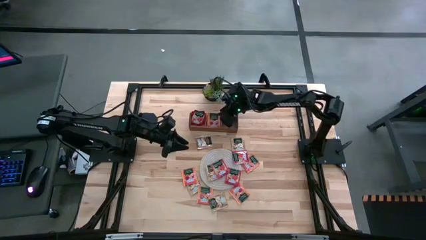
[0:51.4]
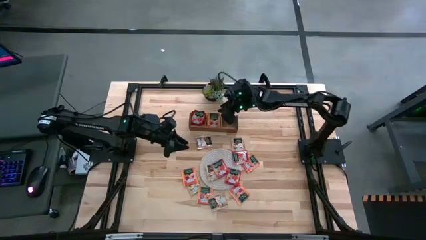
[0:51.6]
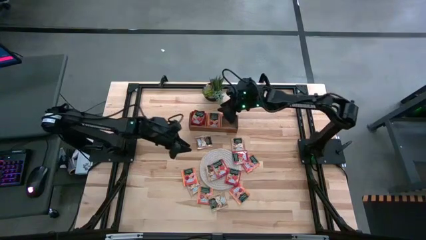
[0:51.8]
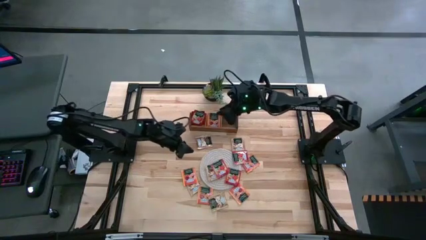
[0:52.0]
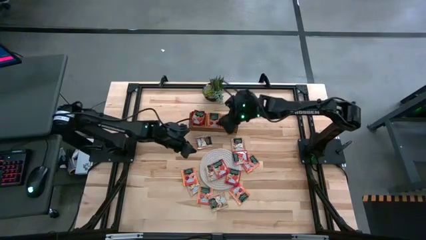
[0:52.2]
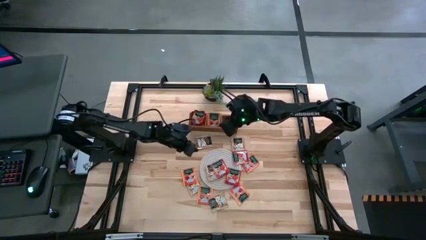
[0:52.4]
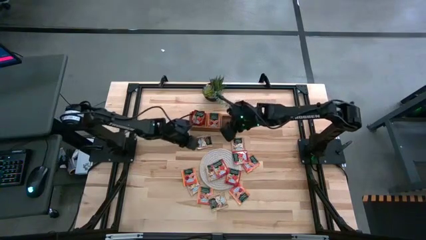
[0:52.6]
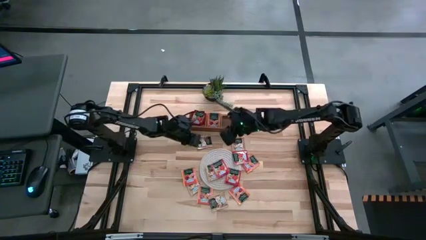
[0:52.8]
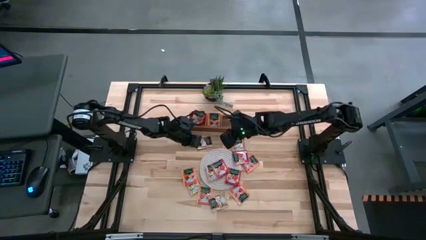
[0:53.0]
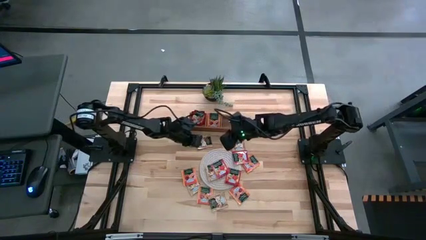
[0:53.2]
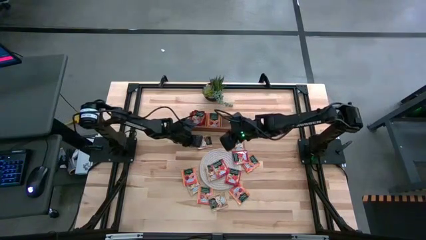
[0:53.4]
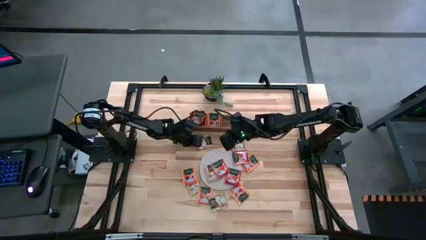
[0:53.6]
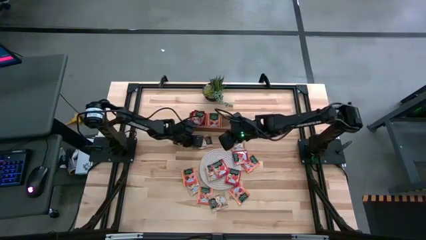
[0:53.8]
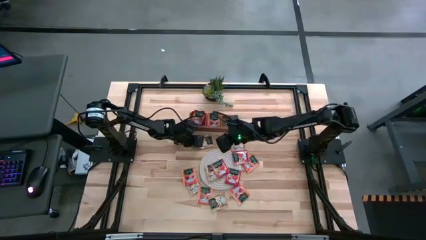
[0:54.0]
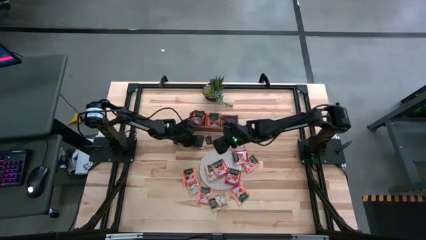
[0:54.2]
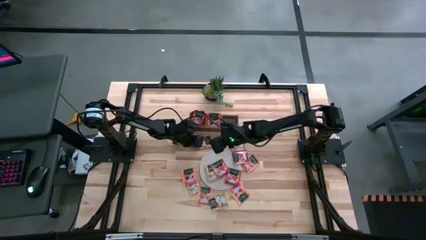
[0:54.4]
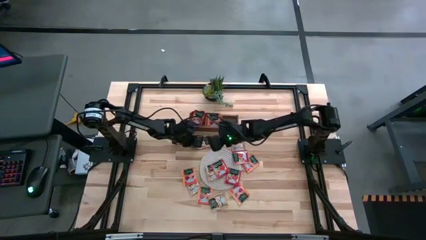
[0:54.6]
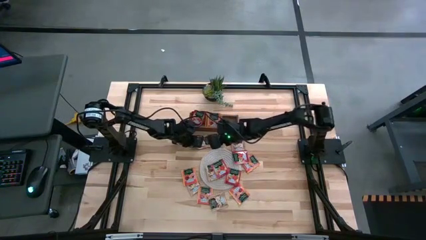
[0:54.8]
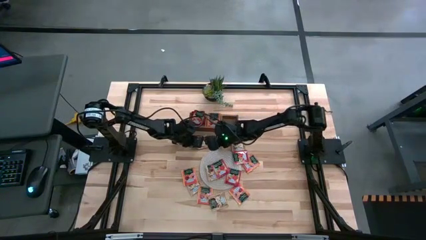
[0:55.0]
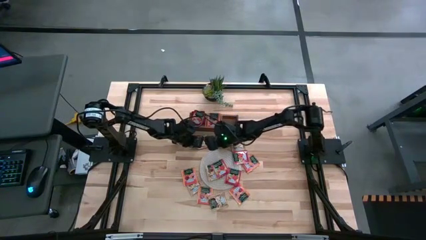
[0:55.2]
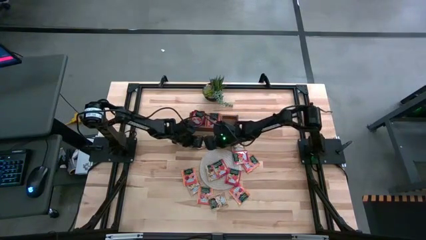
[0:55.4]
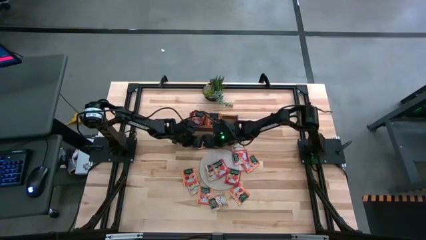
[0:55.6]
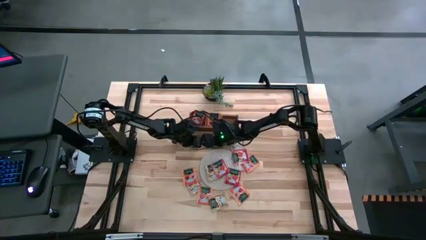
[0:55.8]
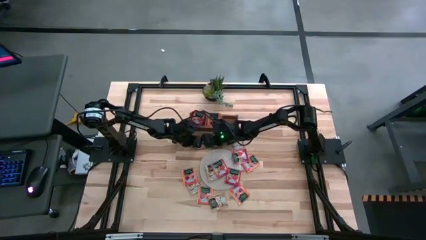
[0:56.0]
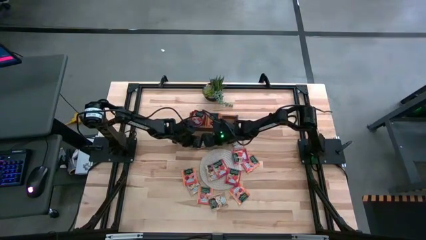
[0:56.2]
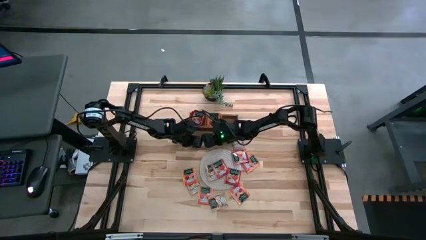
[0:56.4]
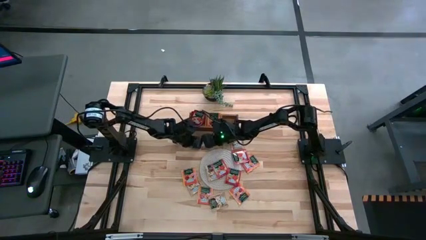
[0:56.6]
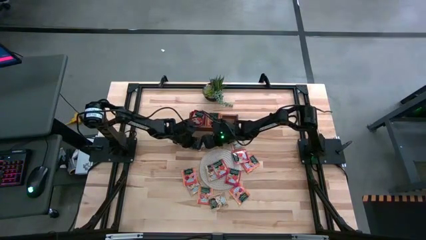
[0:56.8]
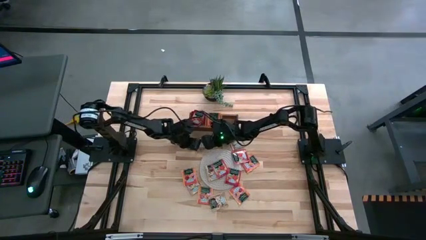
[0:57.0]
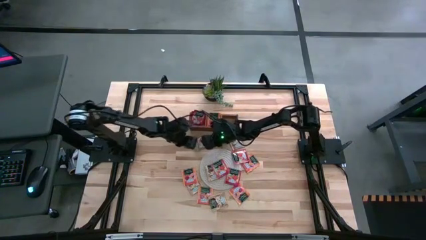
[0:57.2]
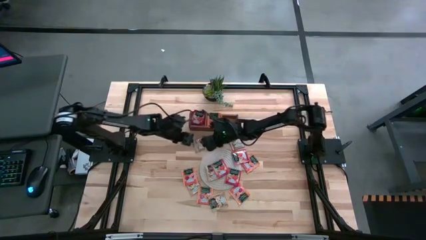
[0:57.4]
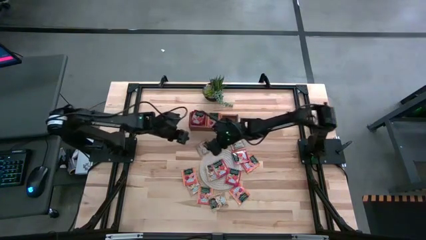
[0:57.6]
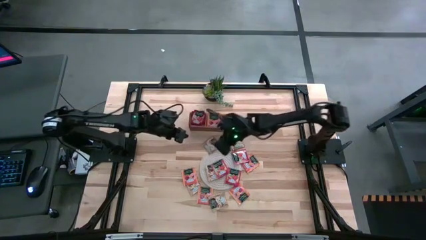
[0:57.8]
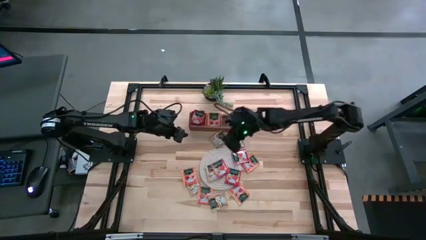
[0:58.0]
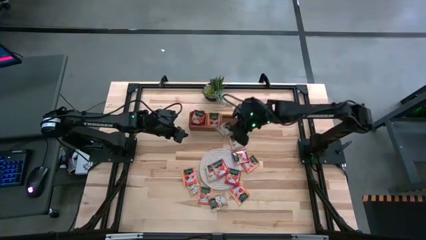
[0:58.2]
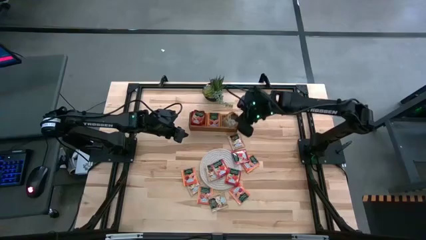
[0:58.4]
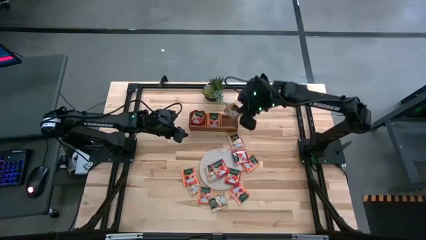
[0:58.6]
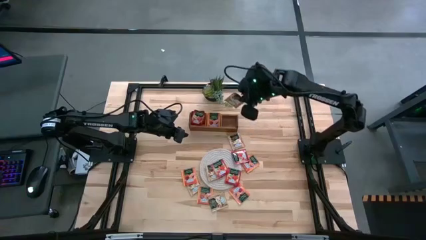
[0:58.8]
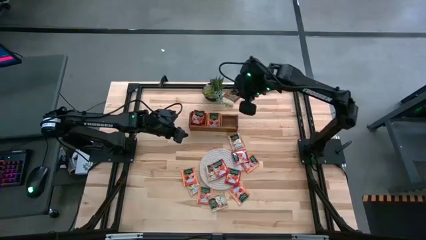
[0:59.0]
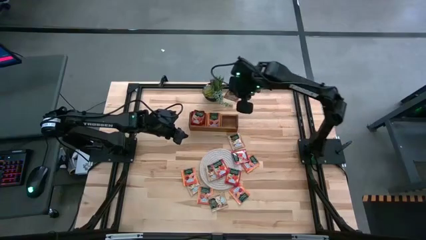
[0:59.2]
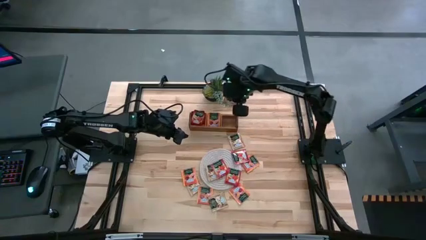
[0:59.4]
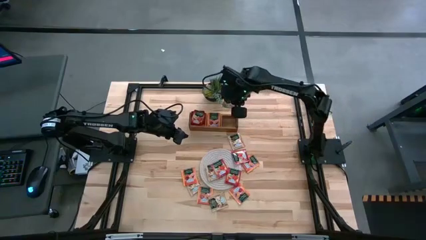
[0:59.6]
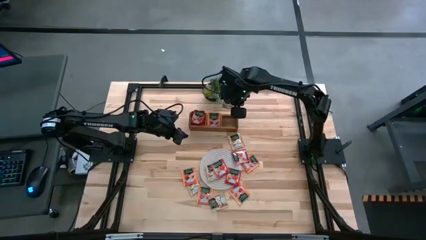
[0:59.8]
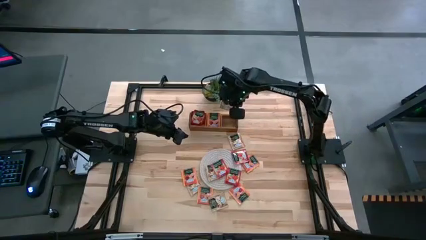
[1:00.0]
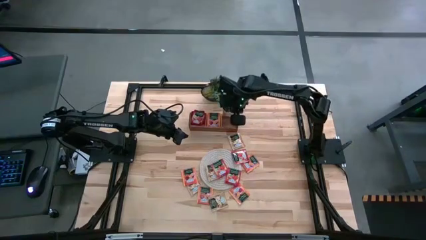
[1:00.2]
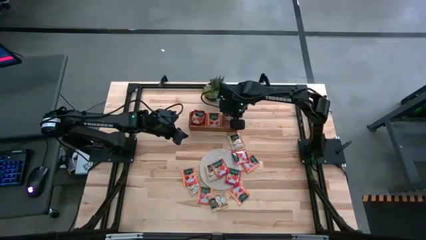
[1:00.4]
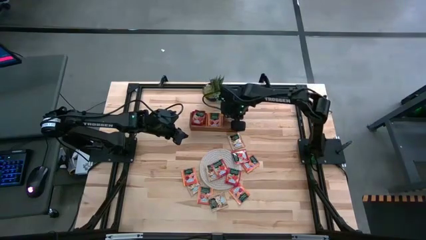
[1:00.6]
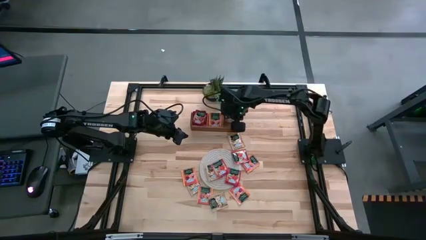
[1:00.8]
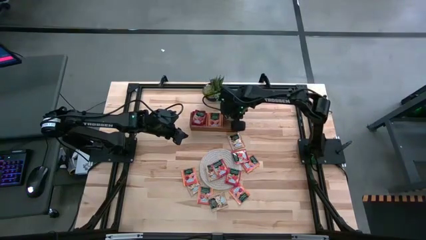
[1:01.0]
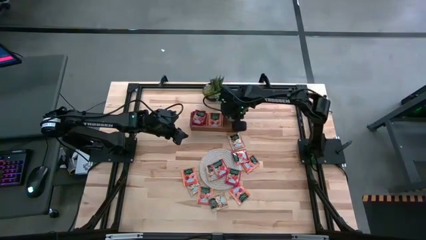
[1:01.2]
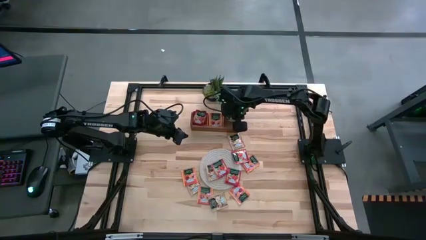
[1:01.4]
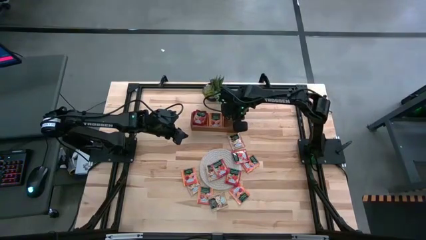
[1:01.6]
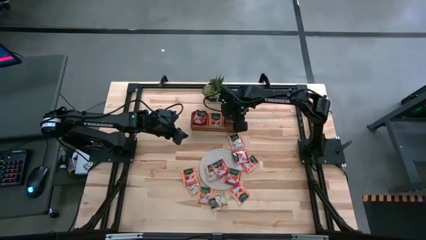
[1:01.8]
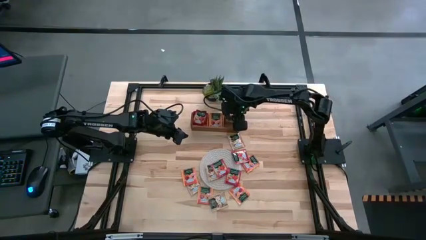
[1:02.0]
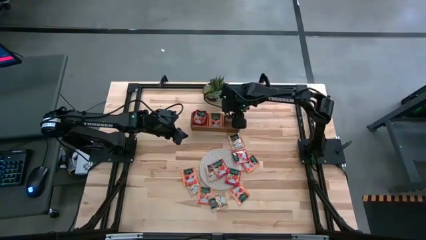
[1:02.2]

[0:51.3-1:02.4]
Task: Pick & Place Tea
Put the light brown tea bag into the right section of the wooden organizer

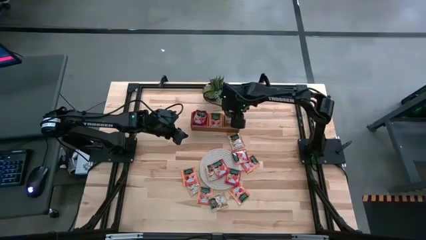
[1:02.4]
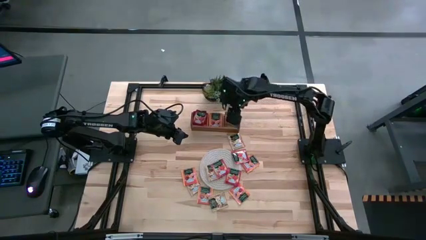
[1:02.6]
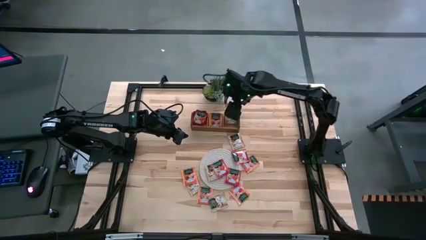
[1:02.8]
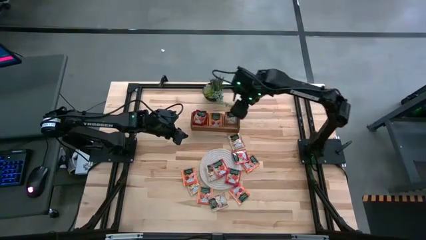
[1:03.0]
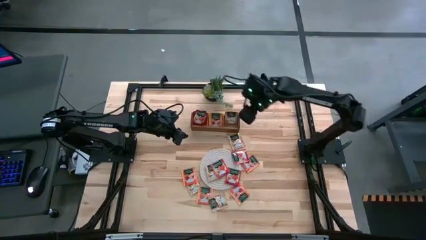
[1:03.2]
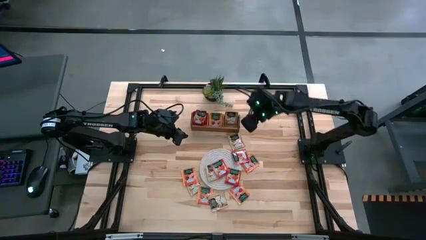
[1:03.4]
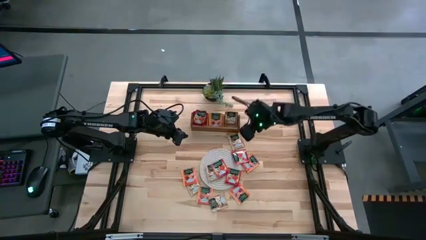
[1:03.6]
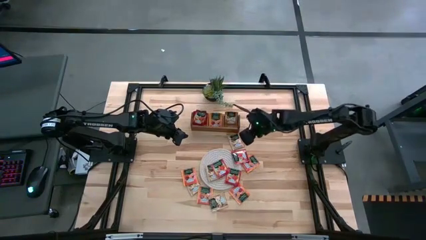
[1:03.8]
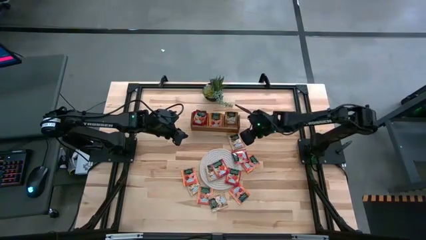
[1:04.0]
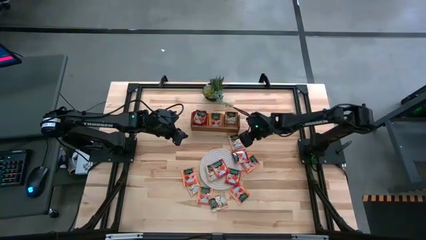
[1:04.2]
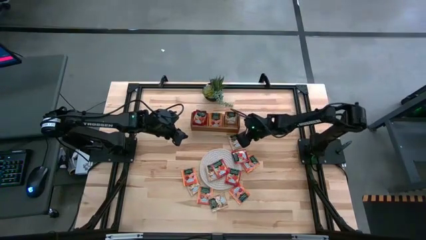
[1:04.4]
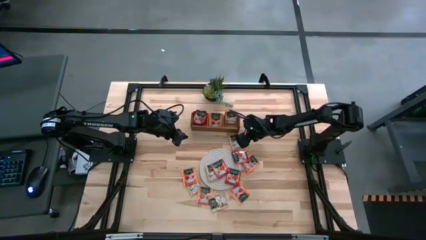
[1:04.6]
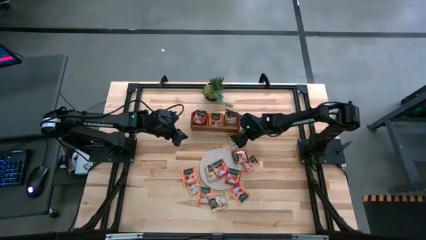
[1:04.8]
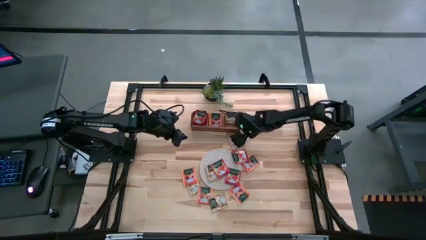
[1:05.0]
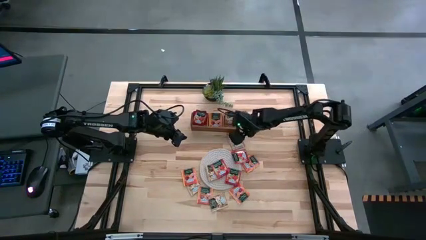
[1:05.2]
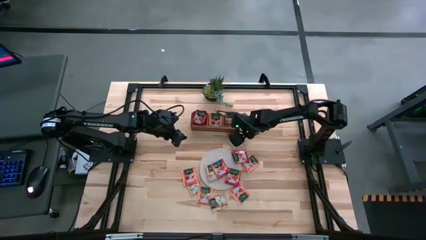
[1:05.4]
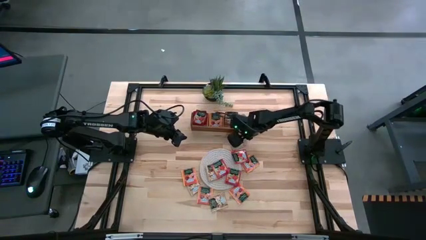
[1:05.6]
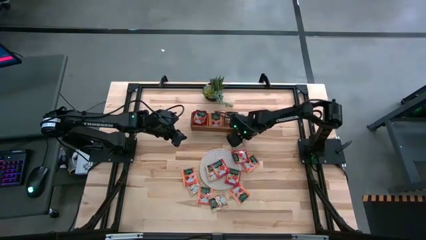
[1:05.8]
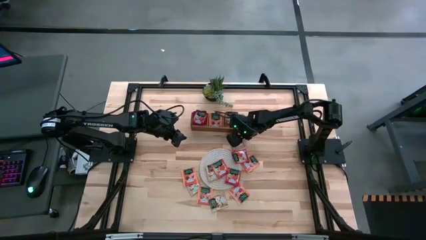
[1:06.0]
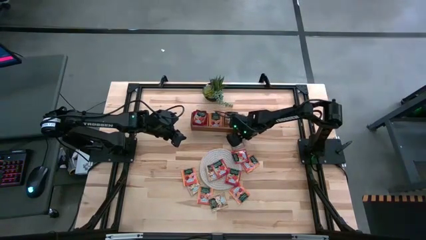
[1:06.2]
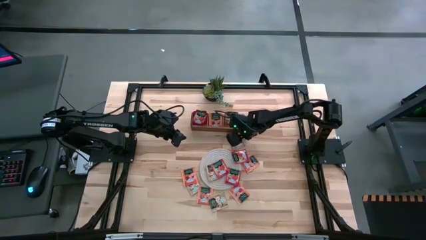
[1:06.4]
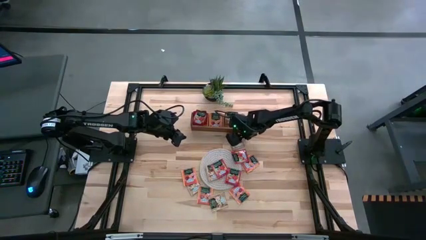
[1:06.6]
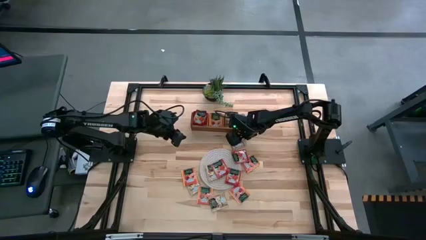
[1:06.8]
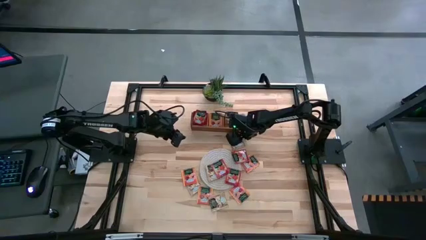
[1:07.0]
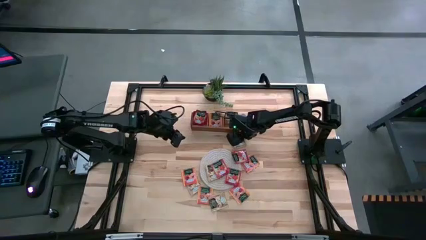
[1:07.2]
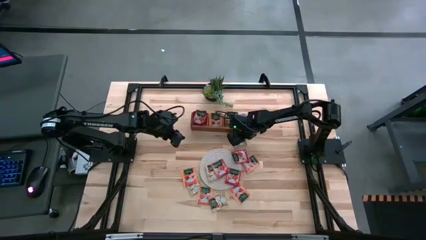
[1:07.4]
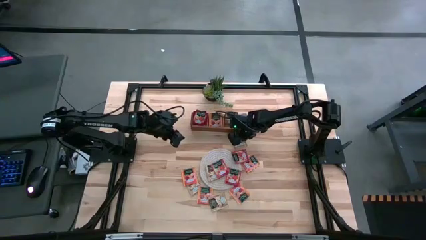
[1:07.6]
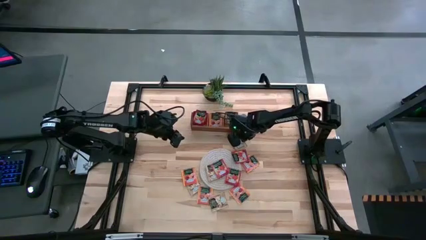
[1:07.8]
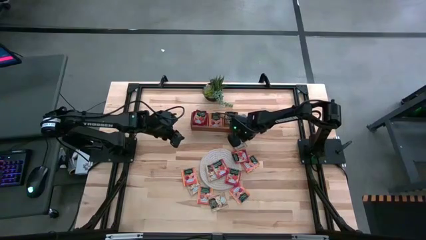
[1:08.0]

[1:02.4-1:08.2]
Put the light brown tea bag into the right section of the wooden organizer
